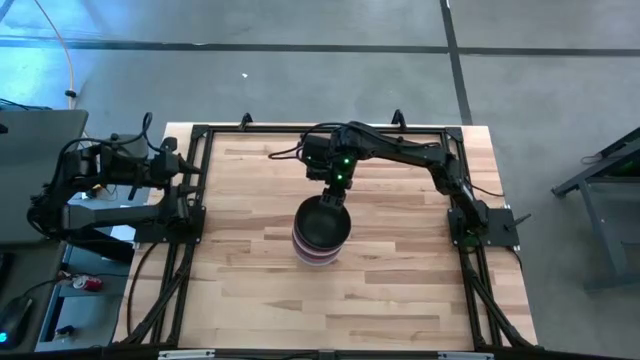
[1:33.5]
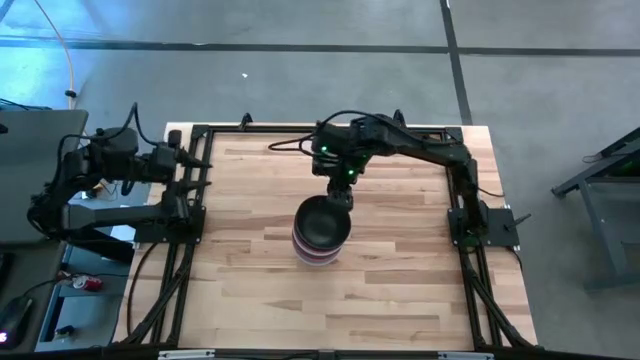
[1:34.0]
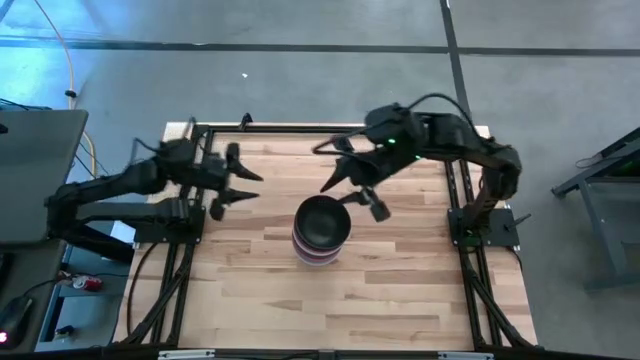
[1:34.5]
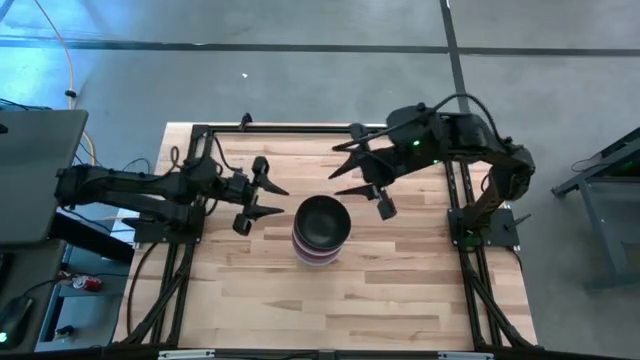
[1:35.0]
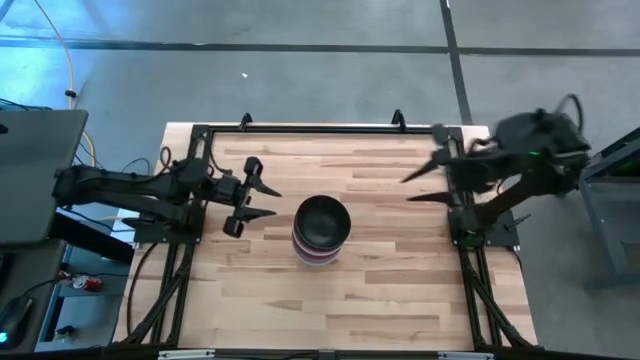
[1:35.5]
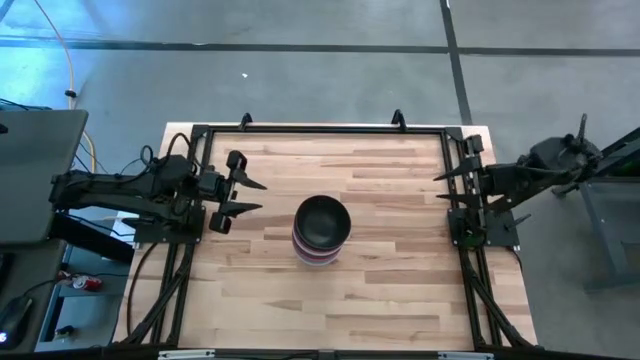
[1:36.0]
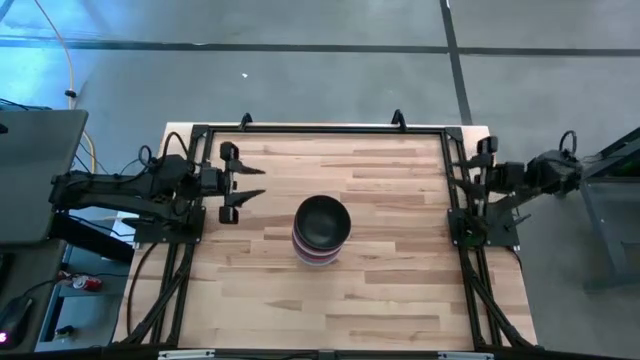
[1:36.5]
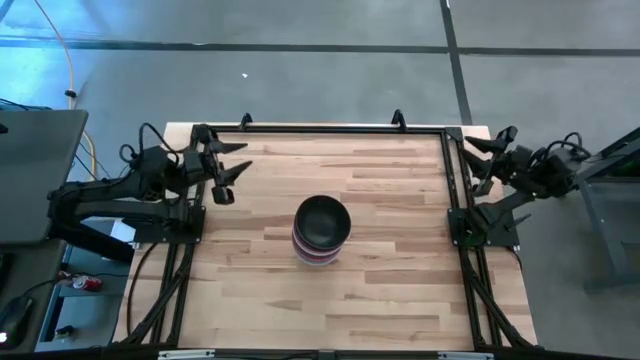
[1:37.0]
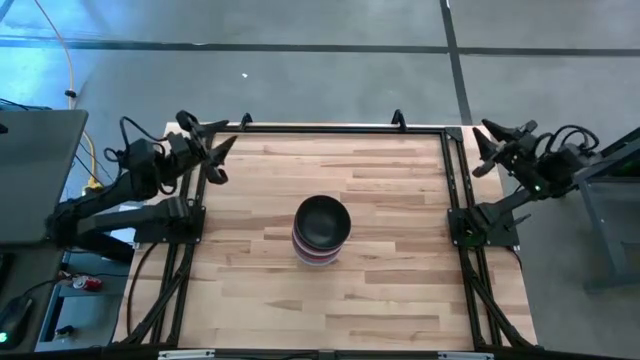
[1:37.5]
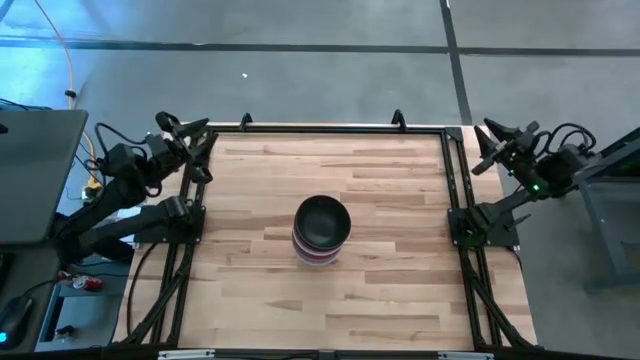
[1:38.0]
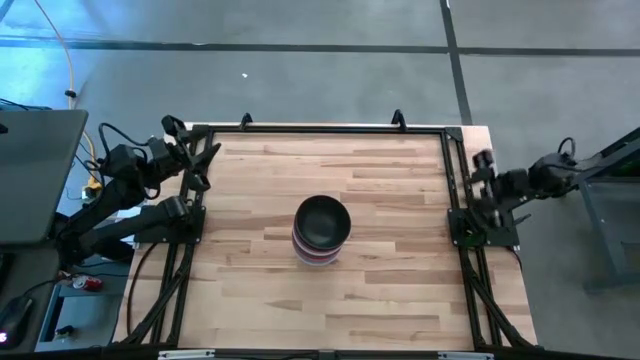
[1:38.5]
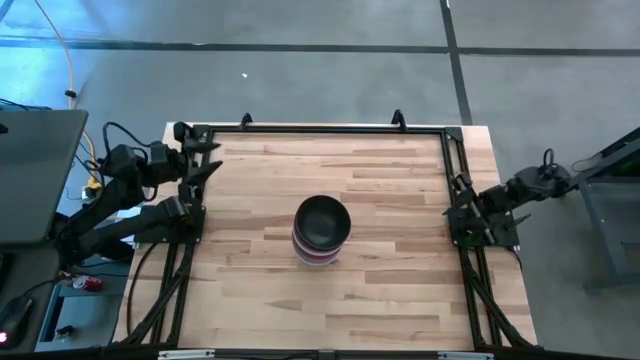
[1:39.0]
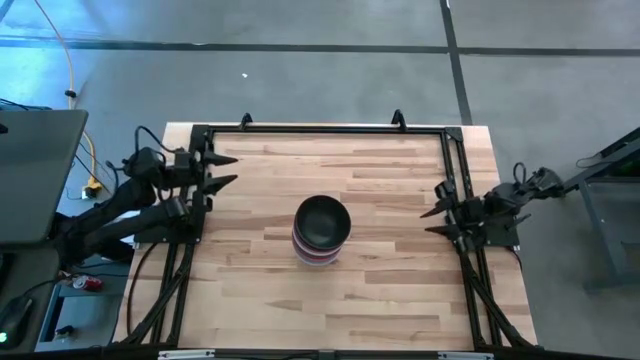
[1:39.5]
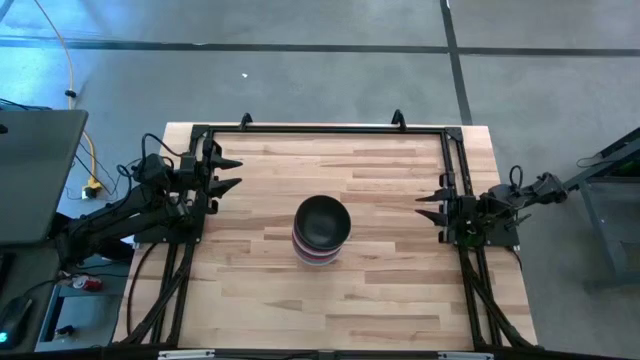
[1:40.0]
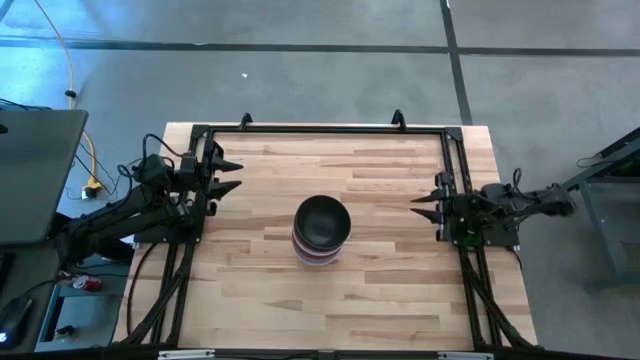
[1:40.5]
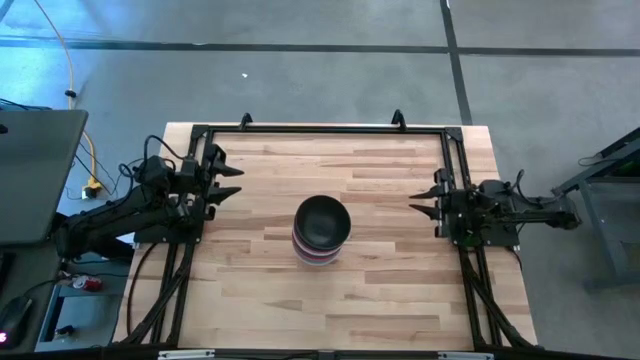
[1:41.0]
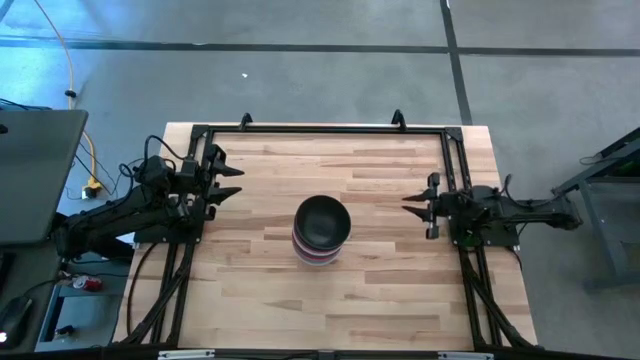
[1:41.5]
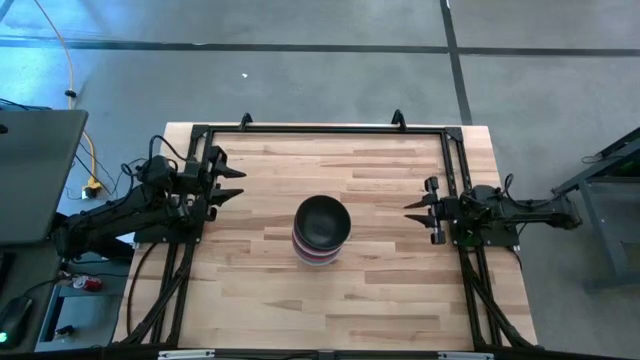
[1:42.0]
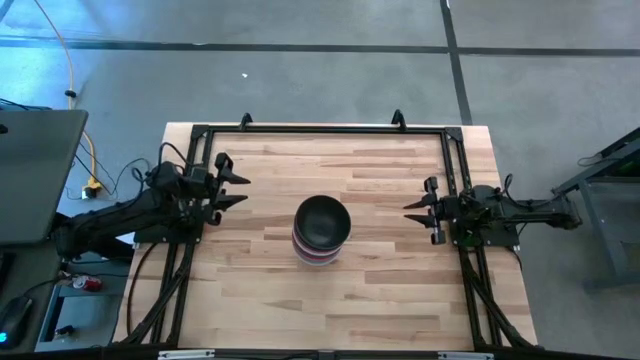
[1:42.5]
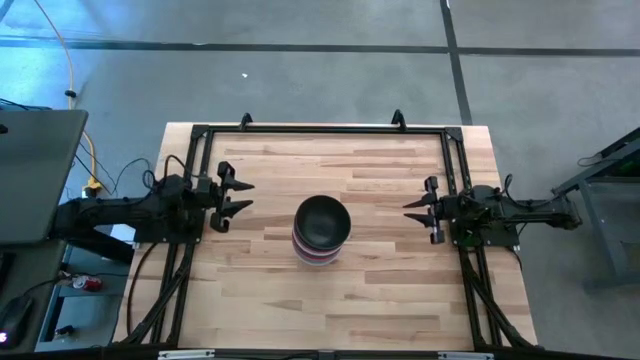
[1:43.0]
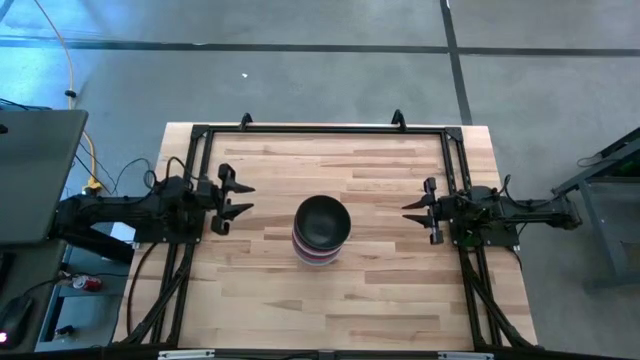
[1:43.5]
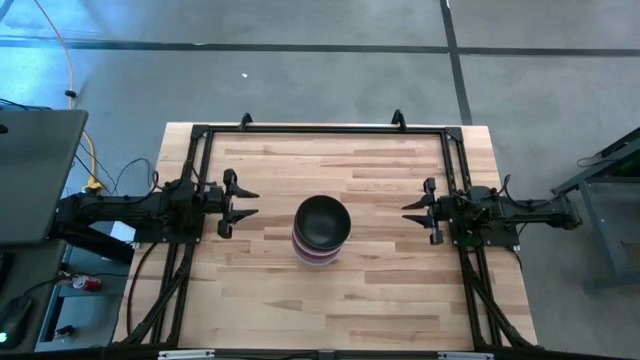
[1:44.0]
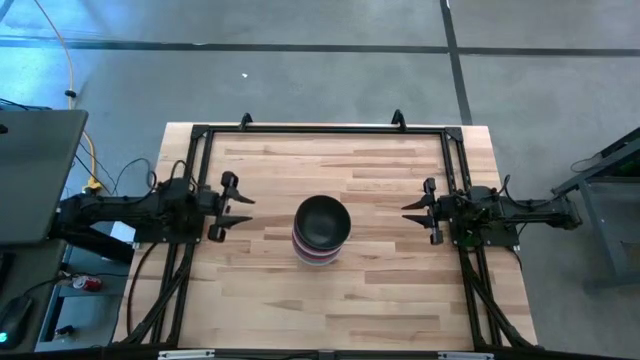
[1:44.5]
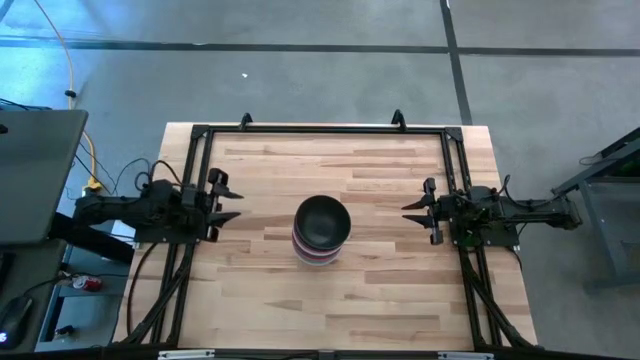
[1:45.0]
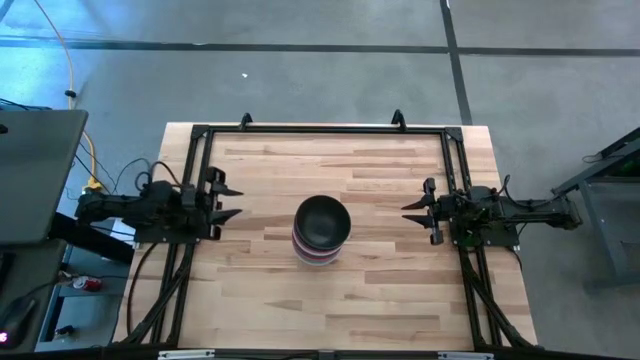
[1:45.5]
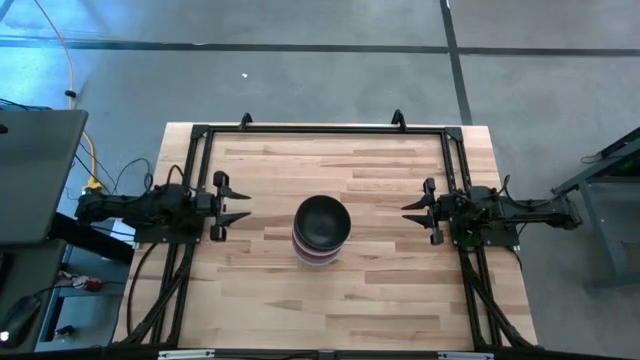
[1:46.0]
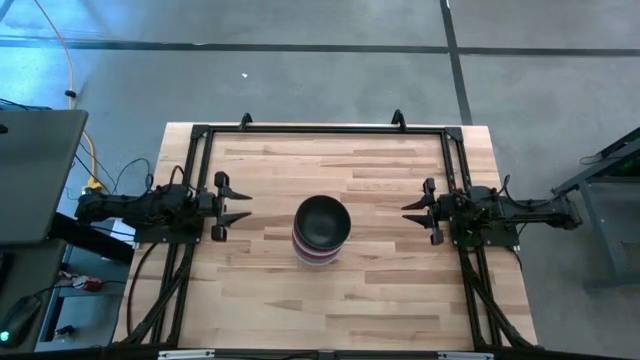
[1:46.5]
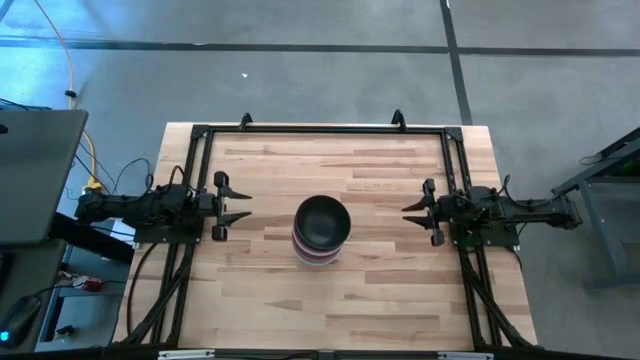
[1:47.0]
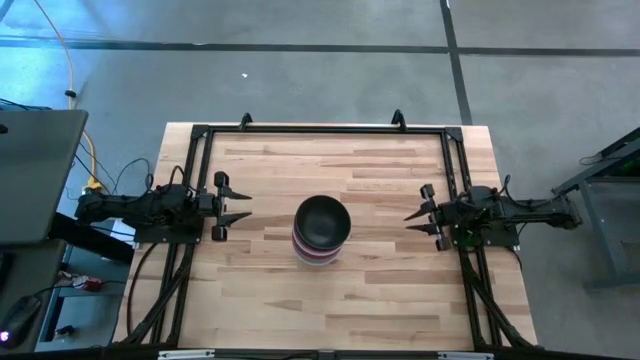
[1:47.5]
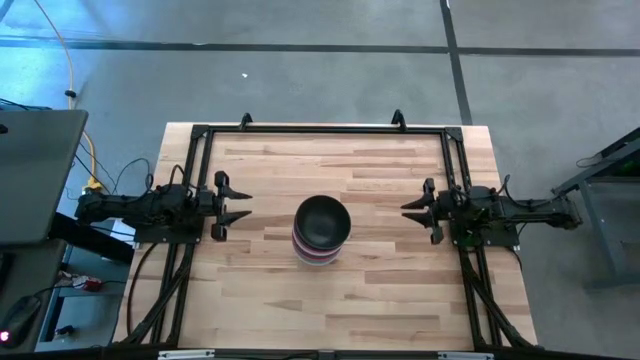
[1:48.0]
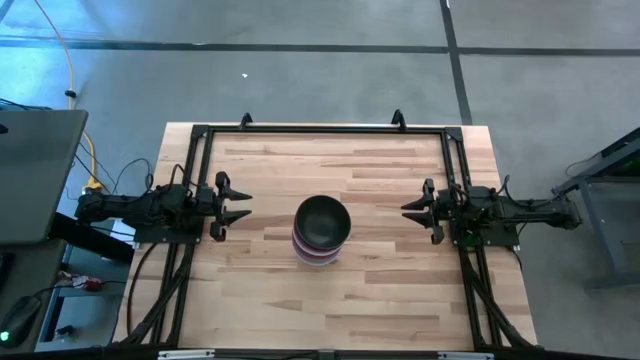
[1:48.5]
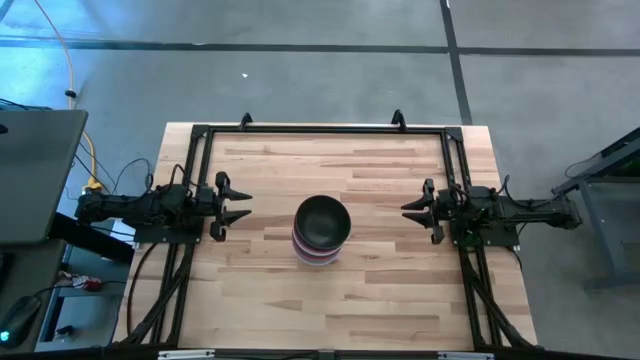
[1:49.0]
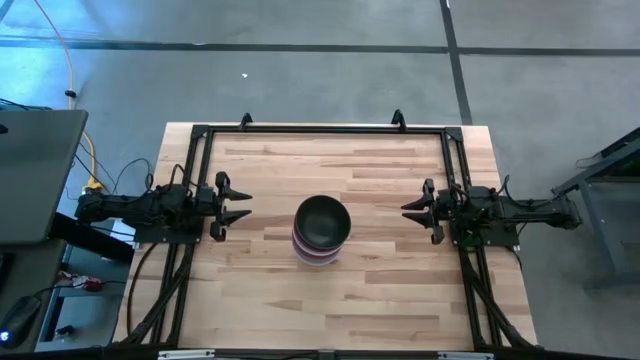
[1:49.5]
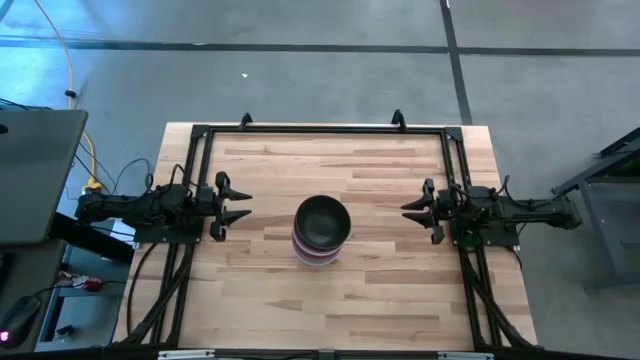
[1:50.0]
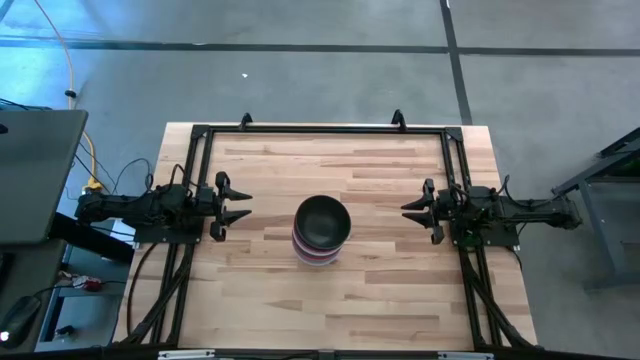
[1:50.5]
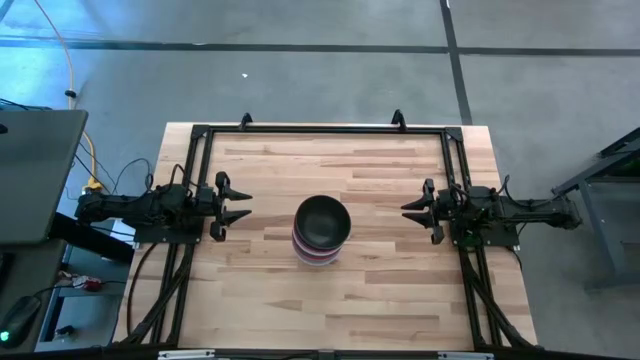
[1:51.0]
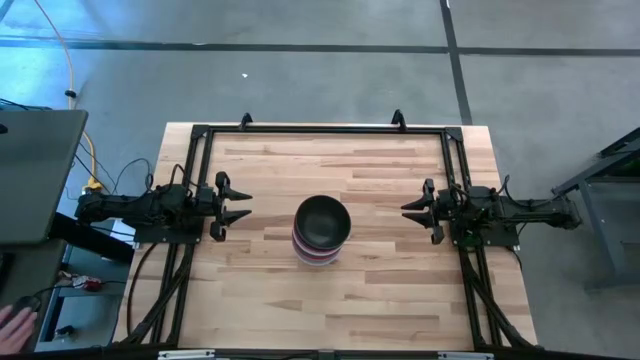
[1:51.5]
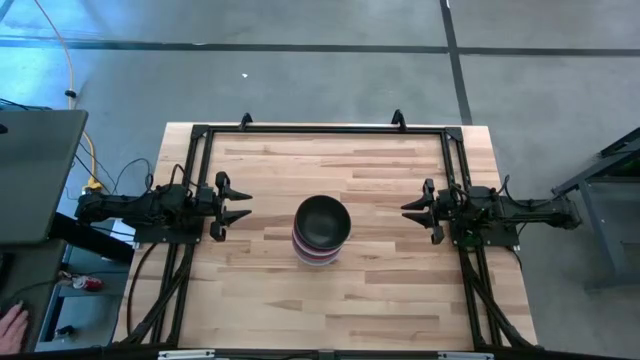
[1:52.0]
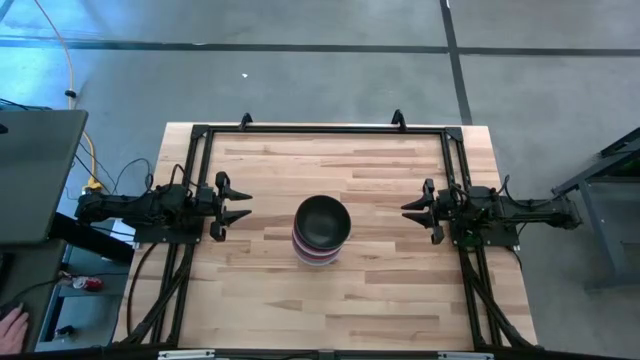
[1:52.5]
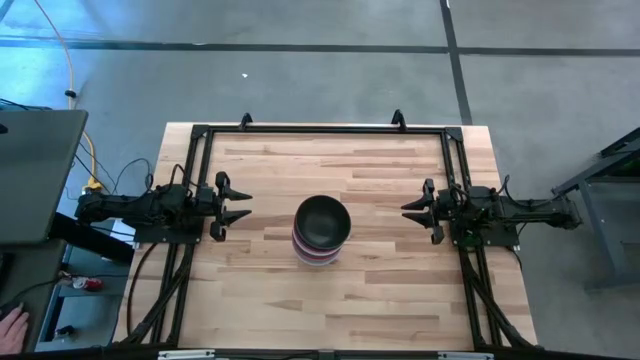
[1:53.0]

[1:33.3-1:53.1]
Task: Nest bowls inside each other
Return to Home Position

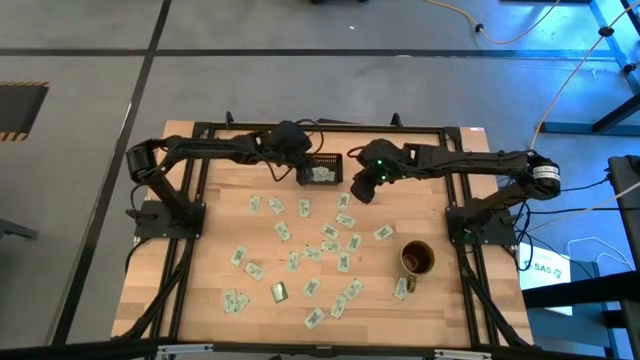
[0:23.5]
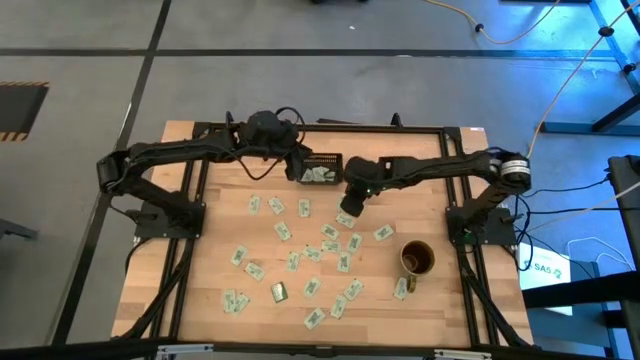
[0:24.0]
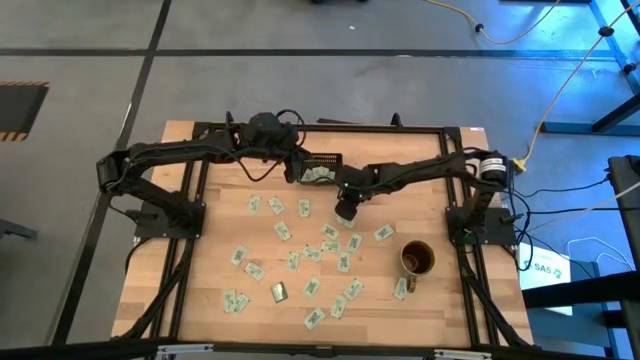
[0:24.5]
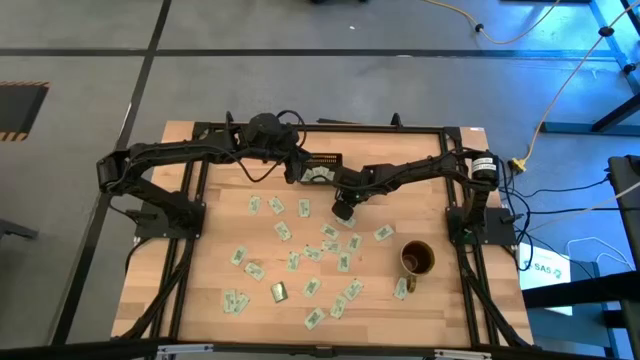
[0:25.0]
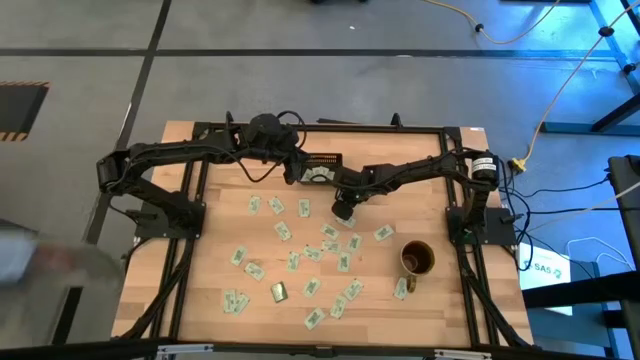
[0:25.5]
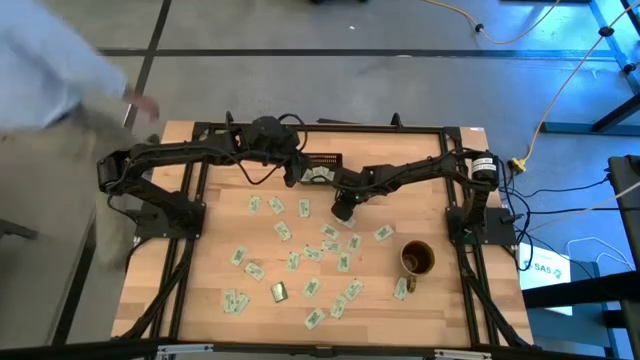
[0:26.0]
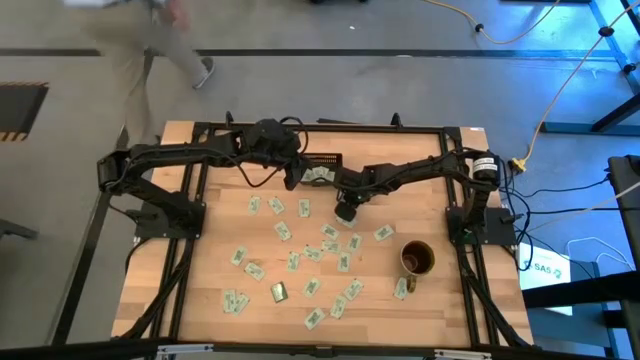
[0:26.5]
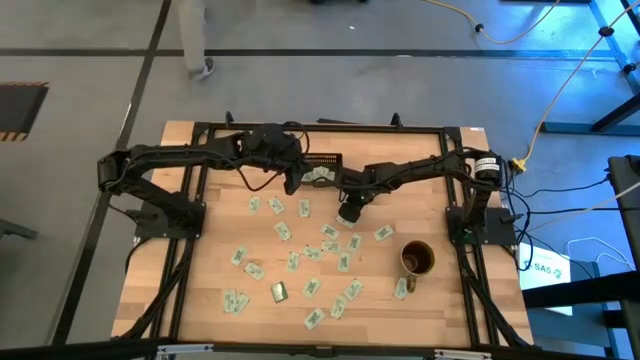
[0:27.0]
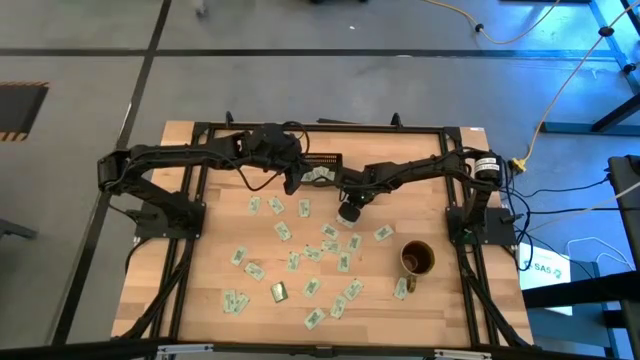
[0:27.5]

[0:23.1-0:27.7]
Task: Pick and place Stevia / Truvia into bins
Put the white stevia packet into the black bin
